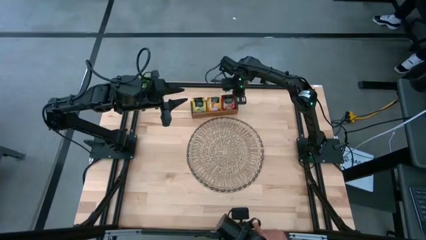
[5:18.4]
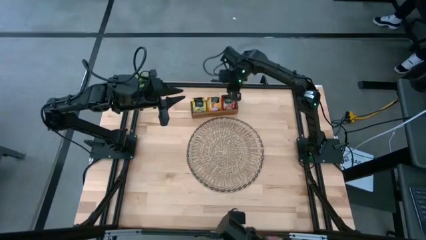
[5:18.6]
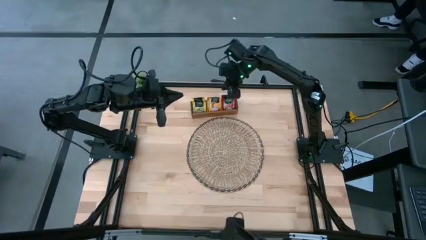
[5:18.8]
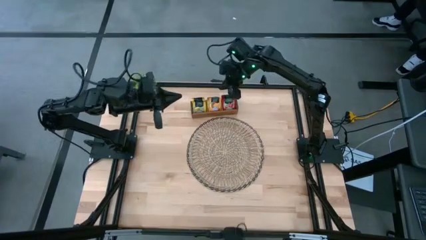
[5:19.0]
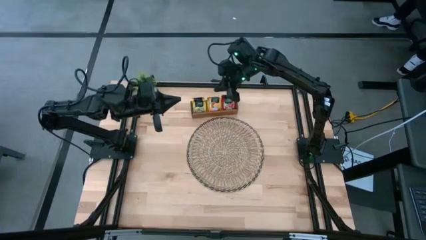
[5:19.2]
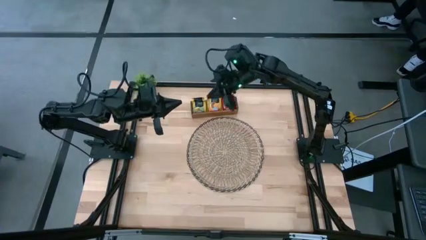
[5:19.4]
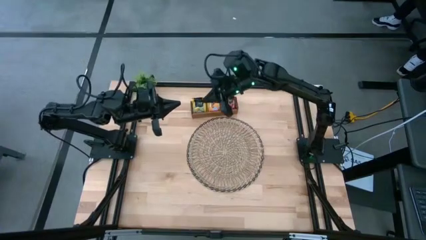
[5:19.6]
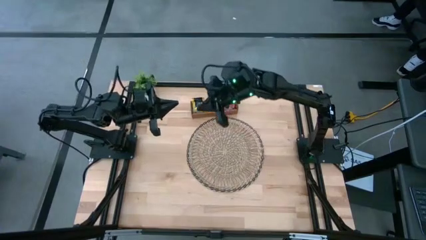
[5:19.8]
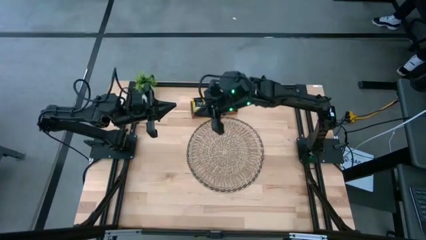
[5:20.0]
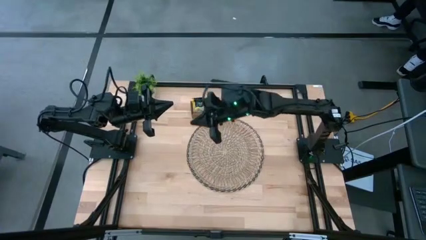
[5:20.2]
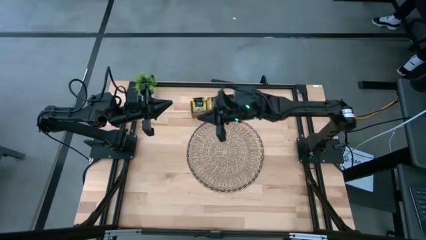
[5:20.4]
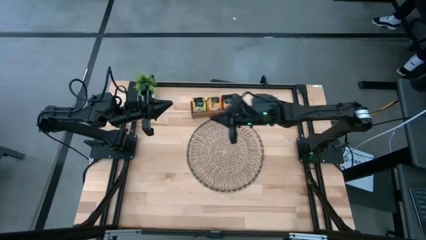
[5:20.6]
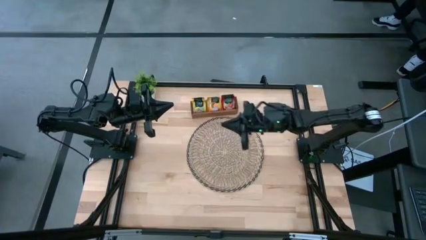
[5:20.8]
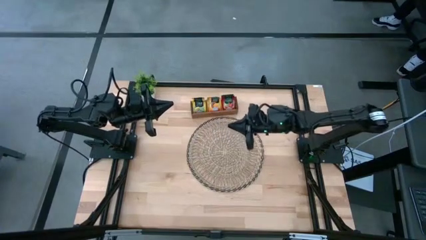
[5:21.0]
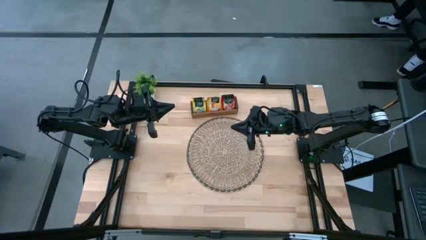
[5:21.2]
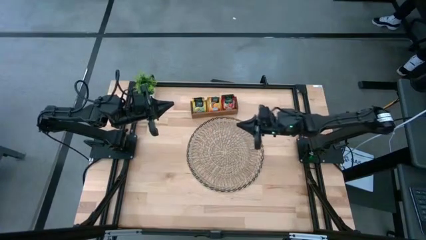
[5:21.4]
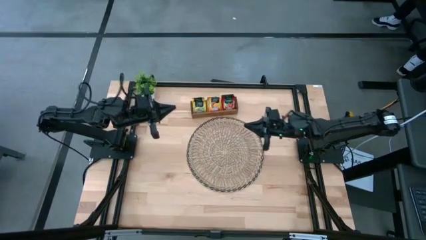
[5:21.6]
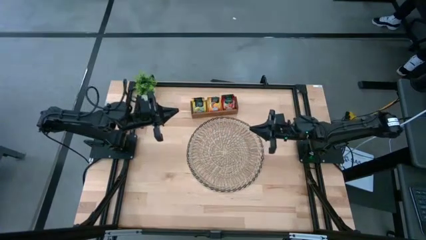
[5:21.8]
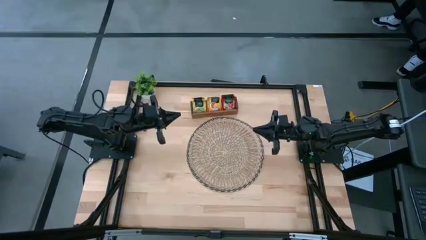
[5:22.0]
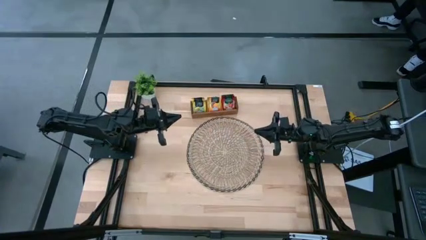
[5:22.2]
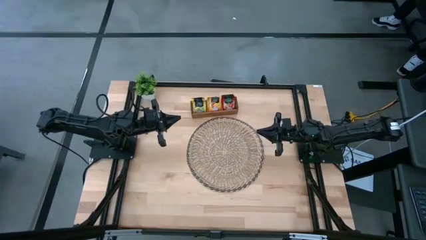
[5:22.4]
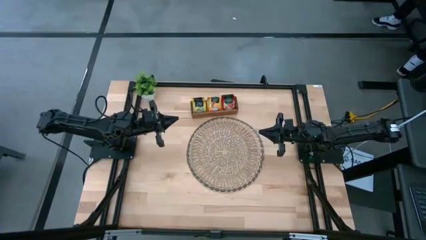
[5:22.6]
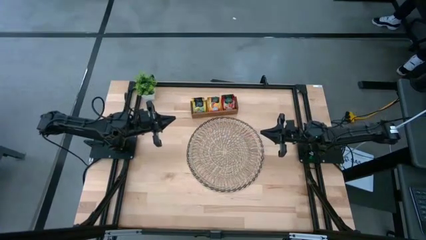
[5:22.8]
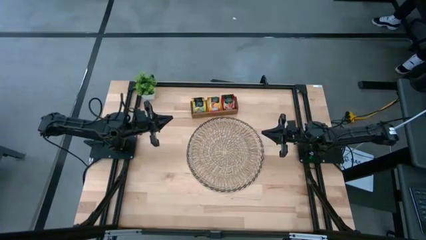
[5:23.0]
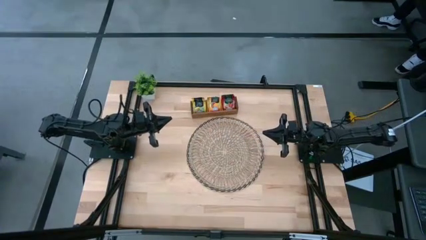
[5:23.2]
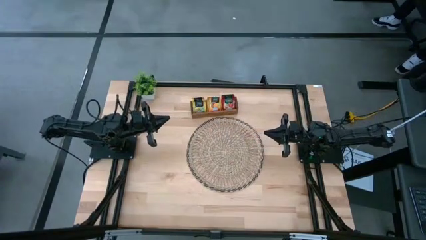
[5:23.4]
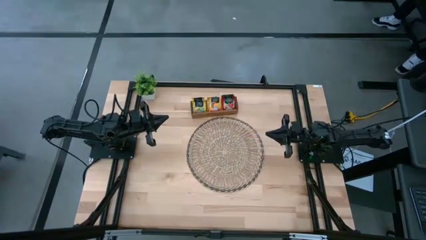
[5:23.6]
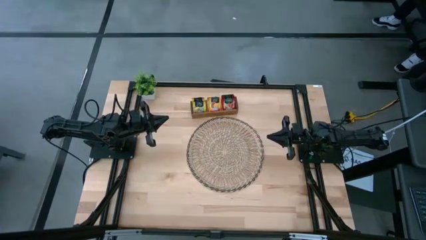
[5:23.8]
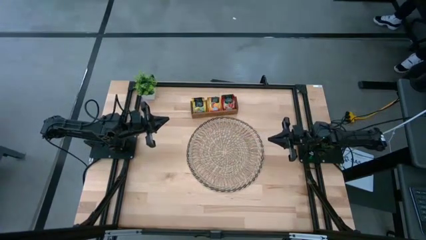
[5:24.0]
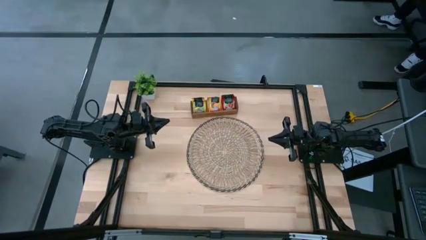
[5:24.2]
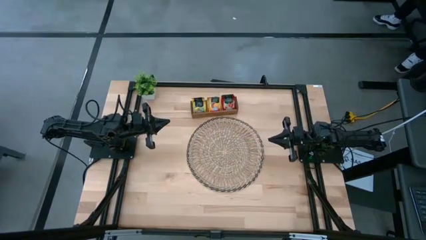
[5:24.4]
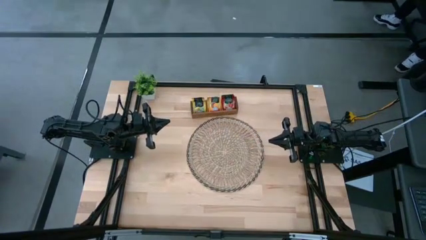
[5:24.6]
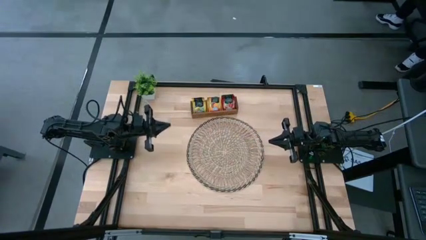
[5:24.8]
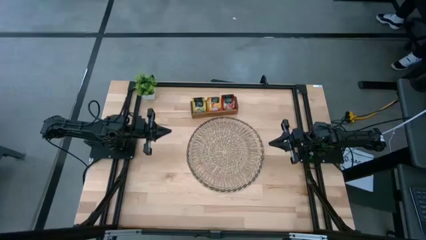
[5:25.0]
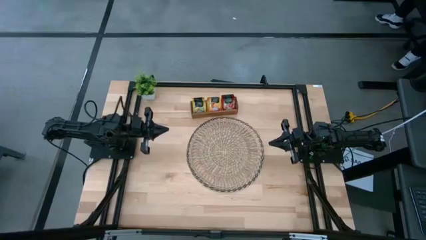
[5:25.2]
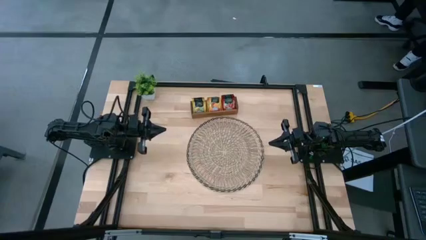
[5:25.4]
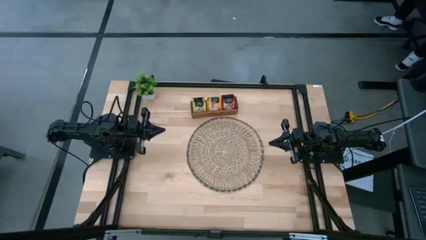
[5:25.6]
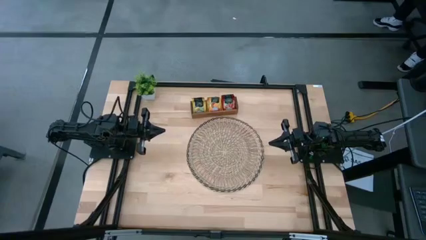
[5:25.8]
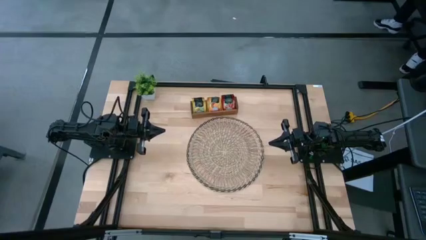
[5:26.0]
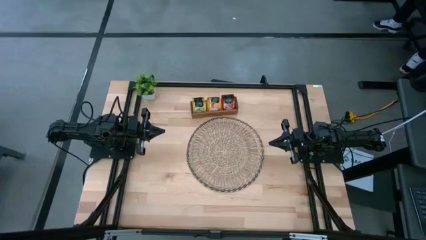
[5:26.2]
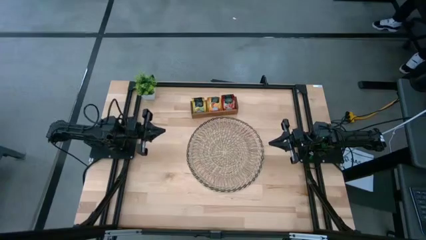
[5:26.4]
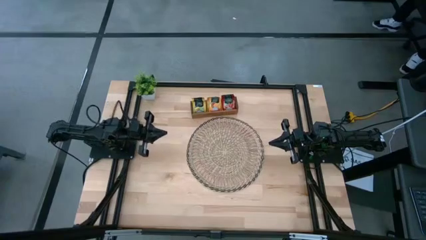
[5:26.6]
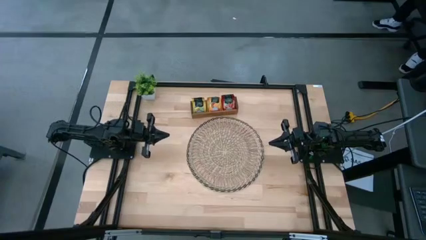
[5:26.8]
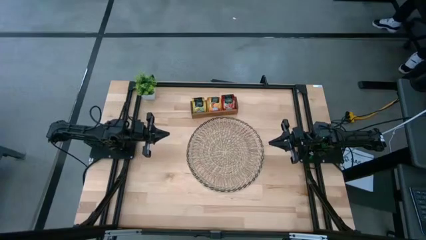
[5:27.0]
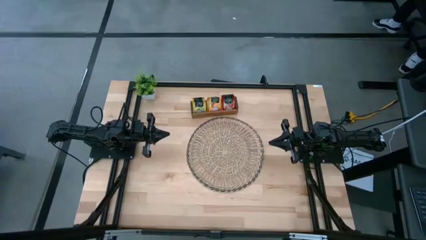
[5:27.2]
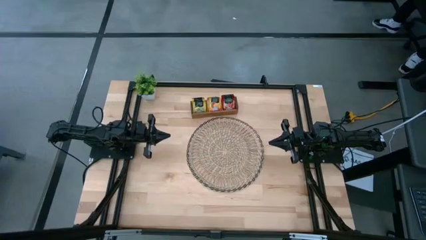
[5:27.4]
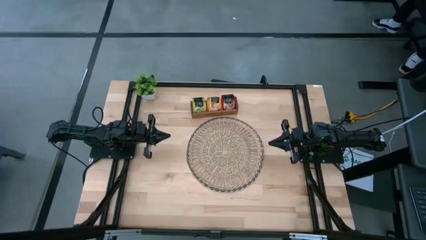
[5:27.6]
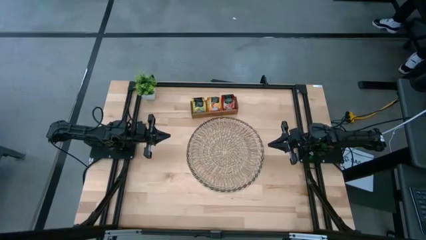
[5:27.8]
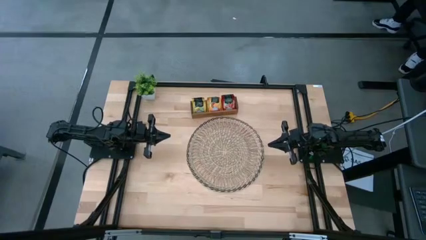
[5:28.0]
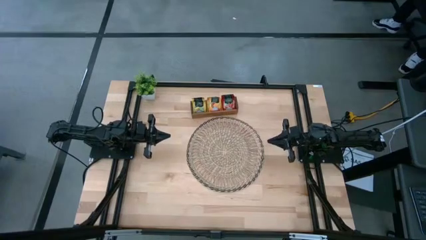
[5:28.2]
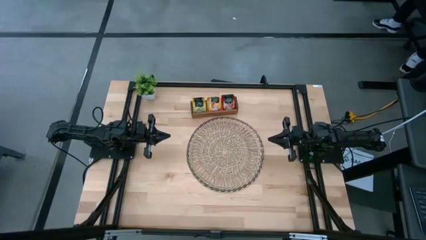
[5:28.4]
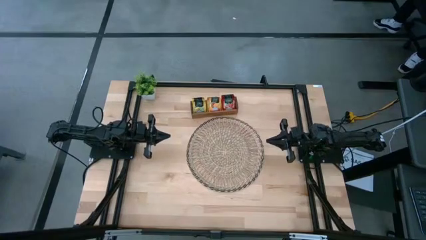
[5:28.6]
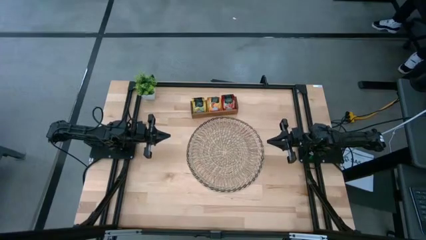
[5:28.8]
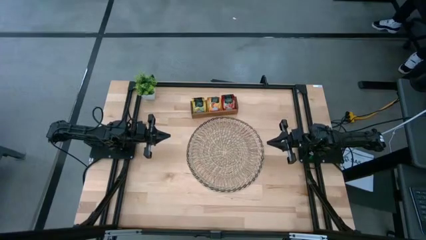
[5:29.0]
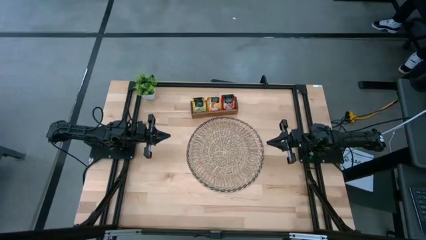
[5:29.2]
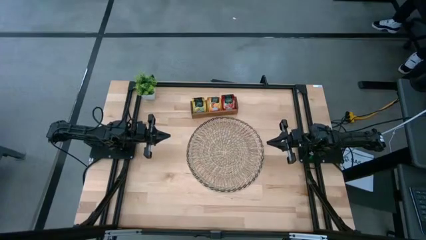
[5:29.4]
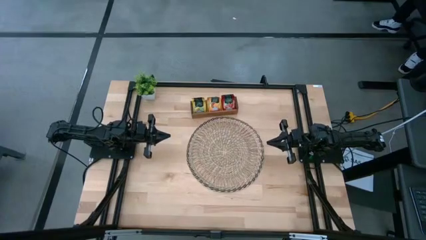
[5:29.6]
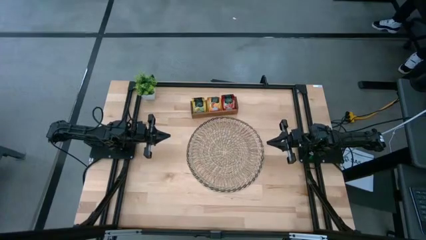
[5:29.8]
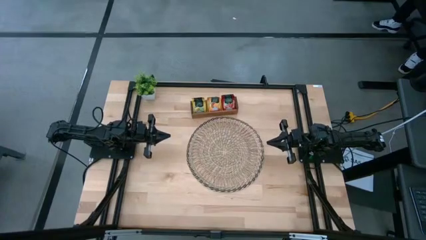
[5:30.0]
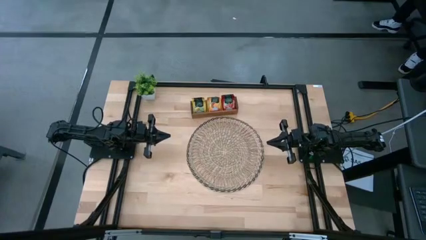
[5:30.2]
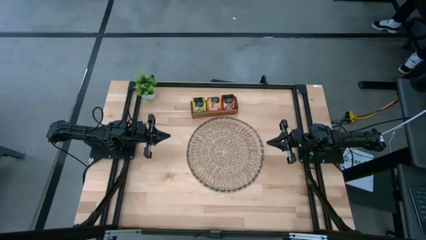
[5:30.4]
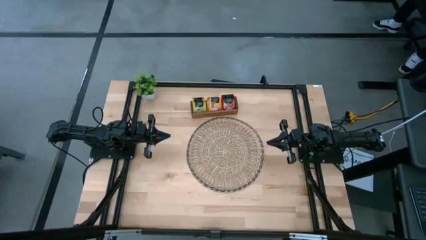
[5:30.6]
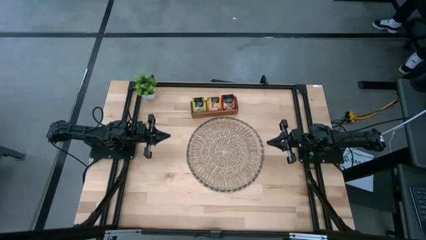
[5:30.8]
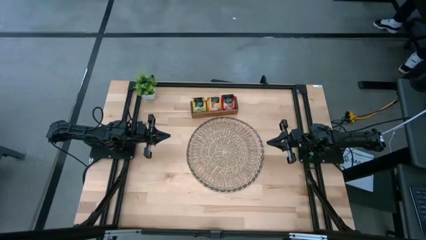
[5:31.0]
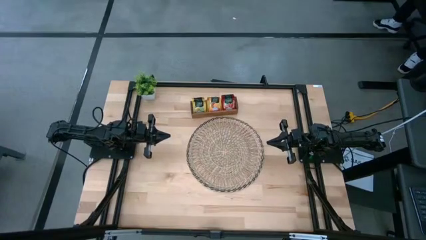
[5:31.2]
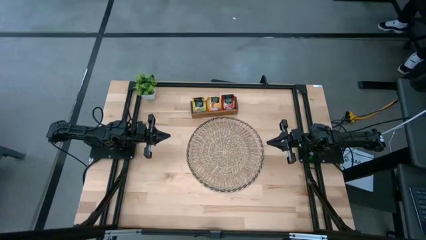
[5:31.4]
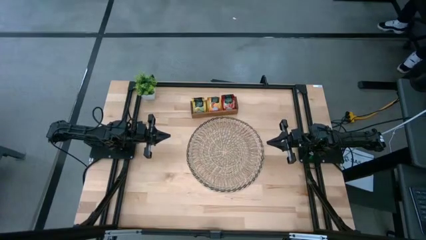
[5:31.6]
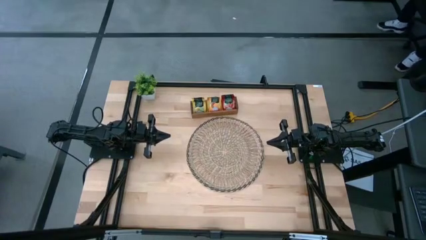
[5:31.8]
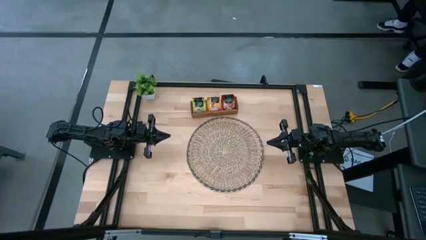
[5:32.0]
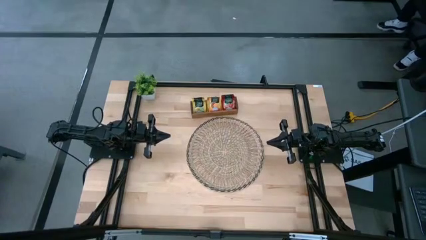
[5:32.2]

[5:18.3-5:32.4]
Task: Pick & Place Tea
Return to Home Position
